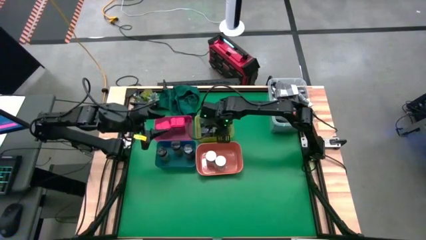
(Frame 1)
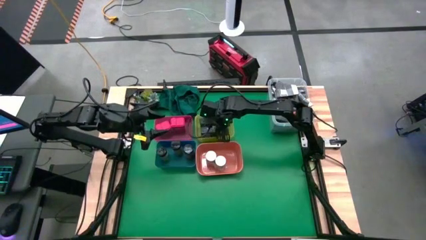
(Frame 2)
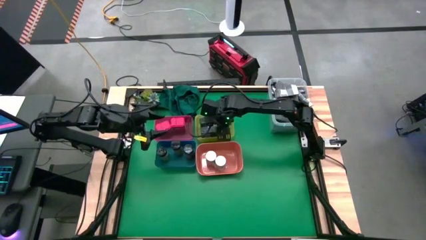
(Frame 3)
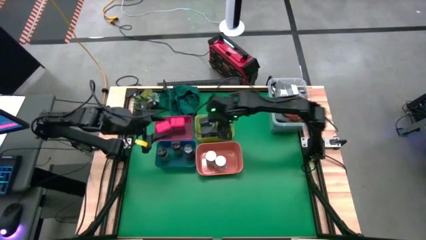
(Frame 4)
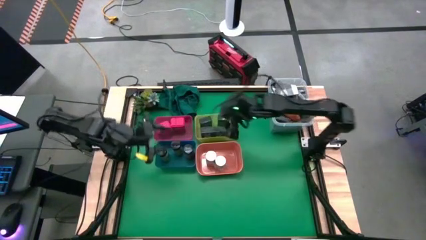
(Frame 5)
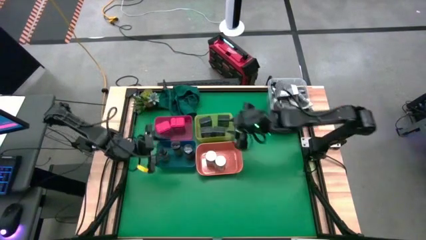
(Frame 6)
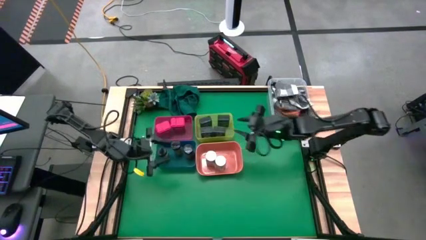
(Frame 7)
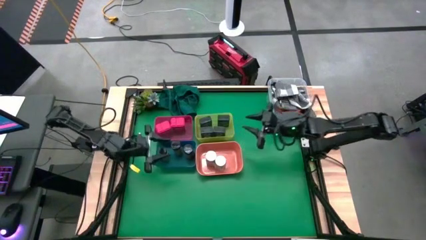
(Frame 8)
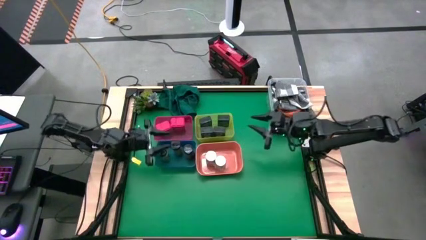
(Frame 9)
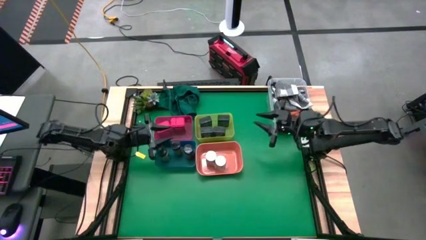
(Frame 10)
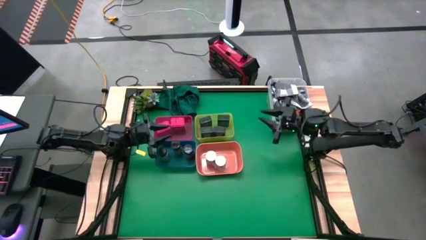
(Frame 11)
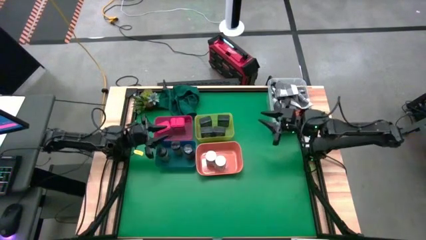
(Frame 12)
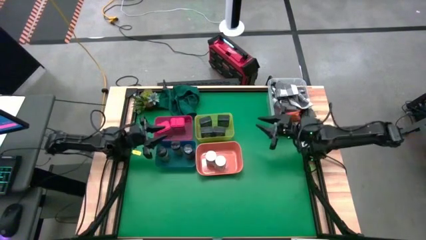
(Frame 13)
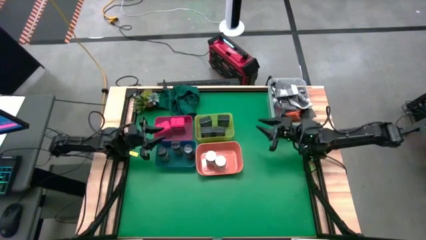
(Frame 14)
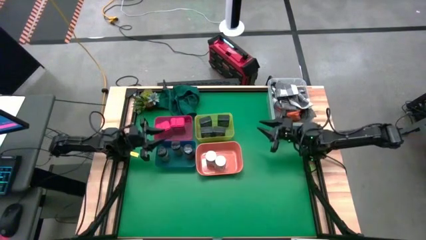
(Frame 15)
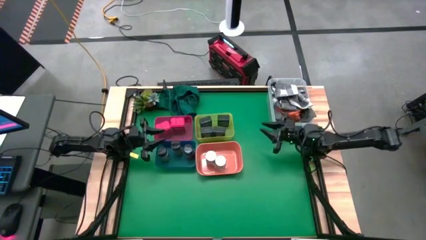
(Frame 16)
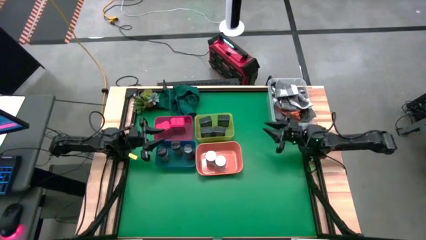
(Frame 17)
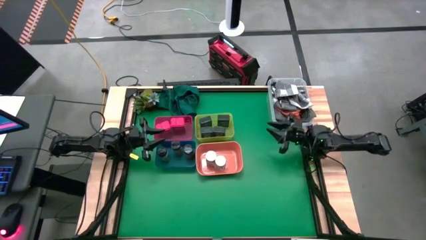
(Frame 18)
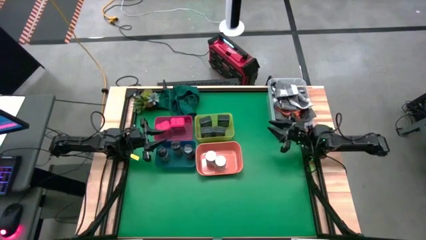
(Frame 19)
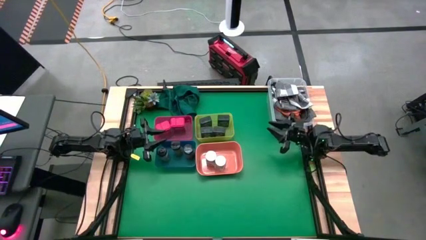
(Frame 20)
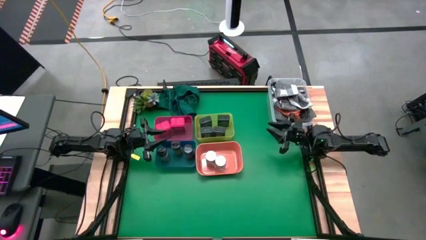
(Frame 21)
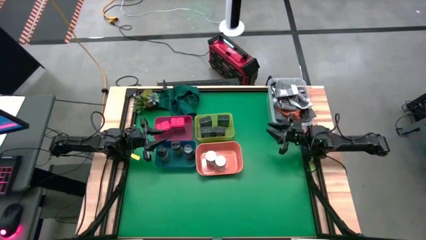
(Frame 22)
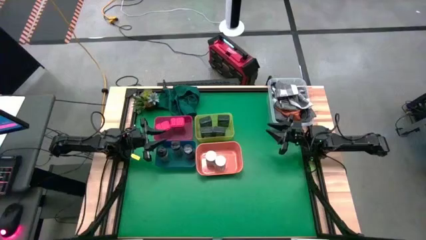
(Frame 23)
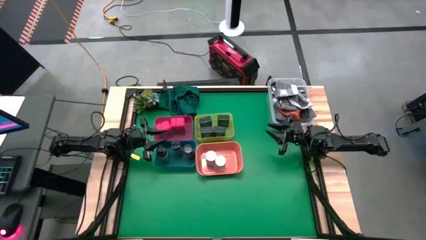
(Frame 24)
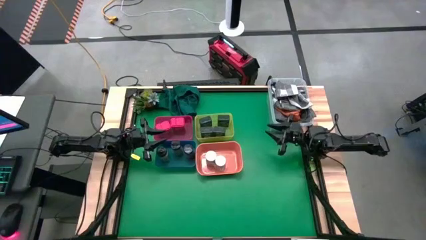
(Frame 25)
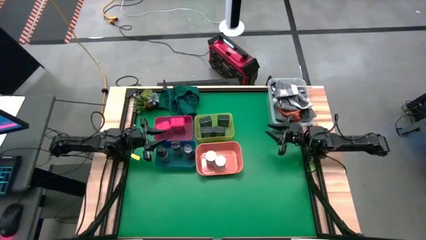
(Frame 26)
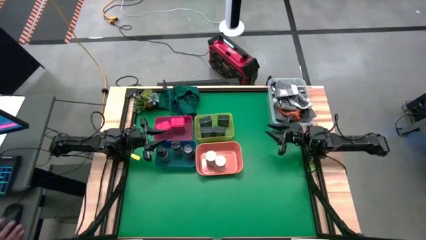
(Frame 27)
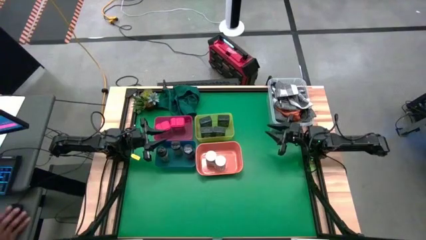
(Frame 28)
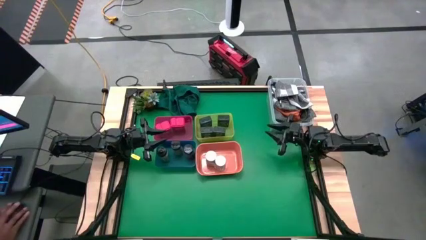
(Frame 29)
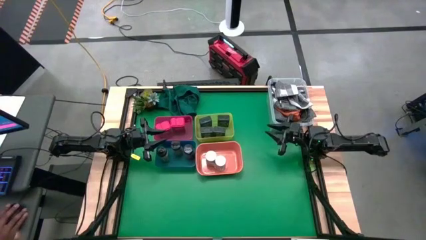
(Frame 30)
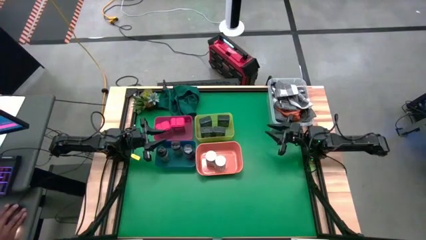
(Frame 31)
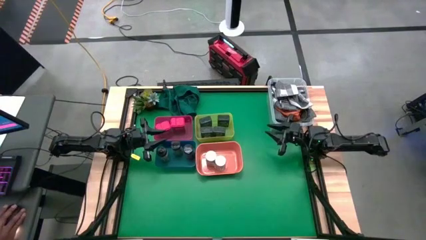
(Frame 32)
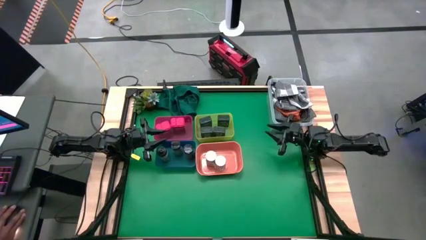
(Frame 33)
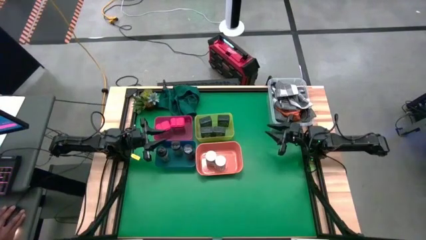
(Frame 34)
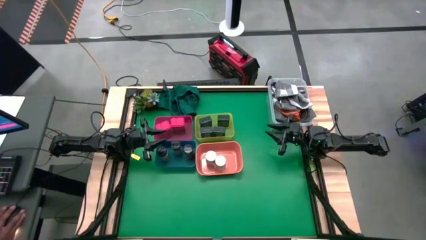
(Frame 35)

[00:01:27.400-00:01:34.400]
Task: Sort spices by type
Return to Home Position

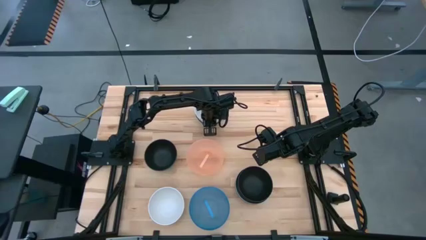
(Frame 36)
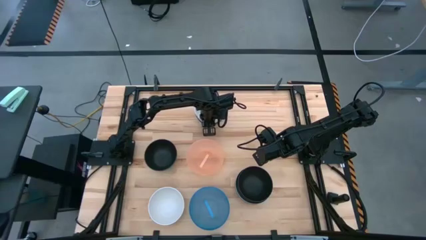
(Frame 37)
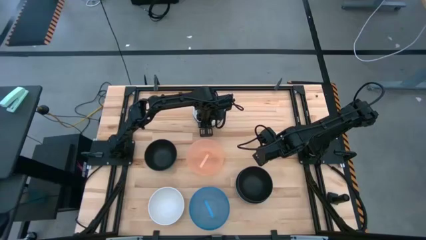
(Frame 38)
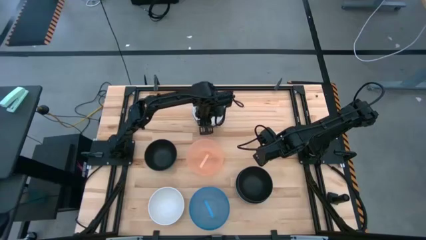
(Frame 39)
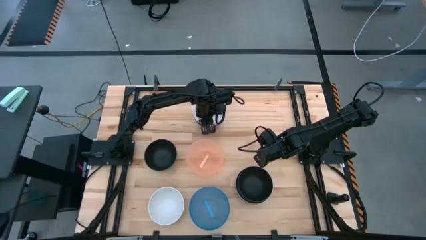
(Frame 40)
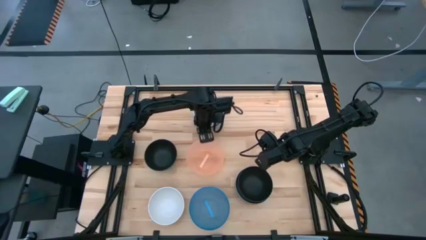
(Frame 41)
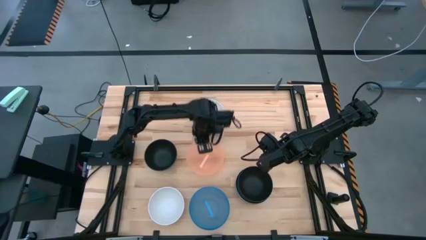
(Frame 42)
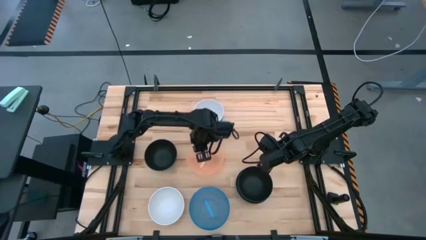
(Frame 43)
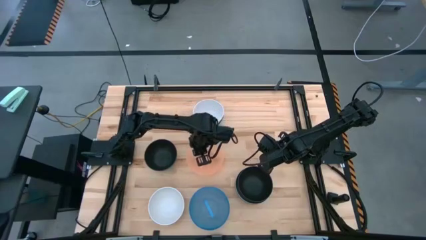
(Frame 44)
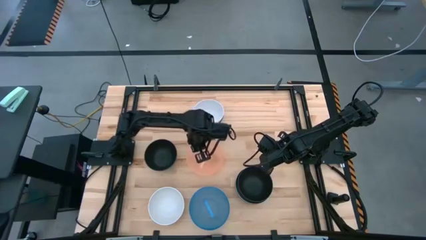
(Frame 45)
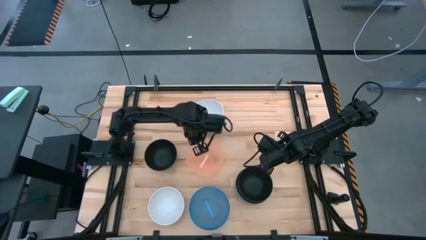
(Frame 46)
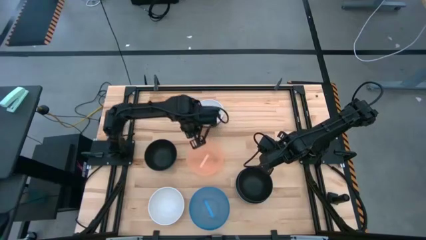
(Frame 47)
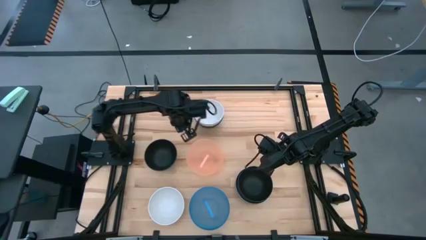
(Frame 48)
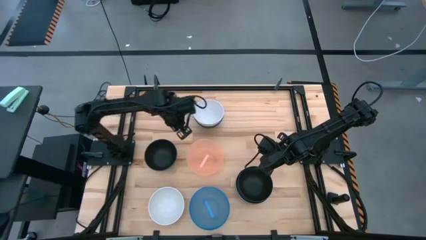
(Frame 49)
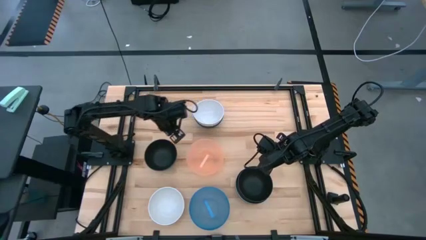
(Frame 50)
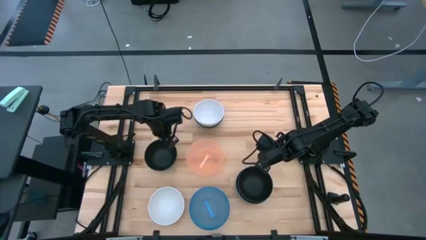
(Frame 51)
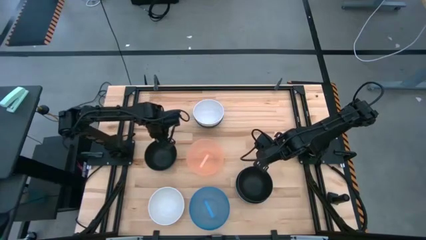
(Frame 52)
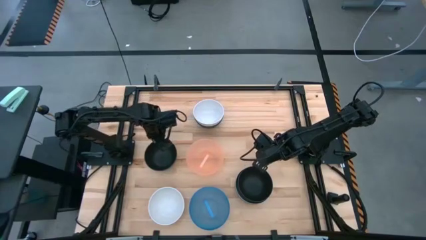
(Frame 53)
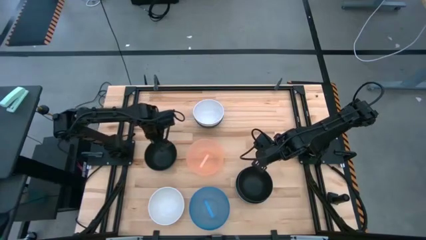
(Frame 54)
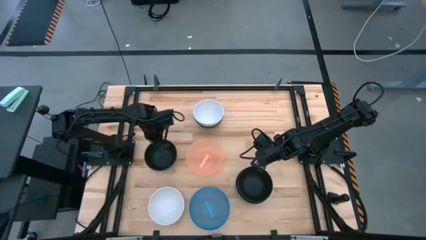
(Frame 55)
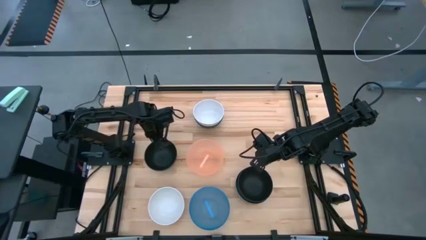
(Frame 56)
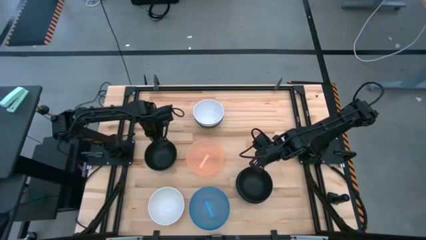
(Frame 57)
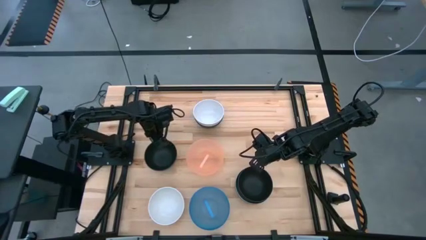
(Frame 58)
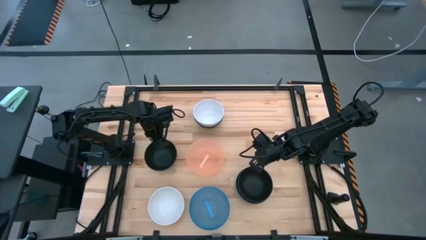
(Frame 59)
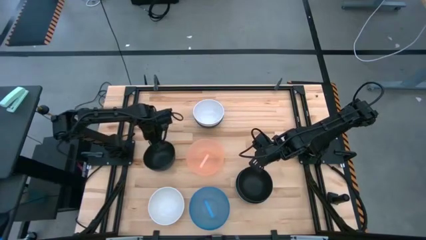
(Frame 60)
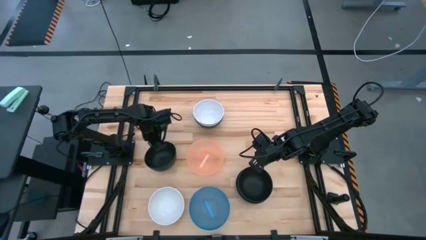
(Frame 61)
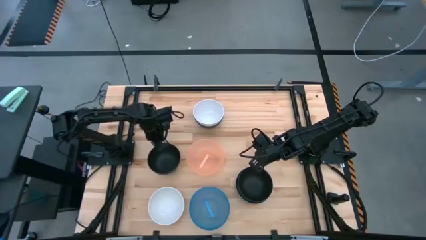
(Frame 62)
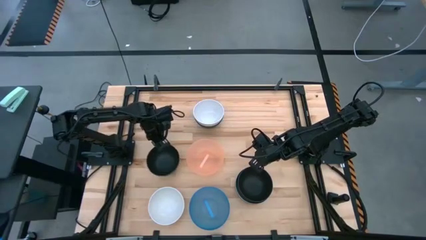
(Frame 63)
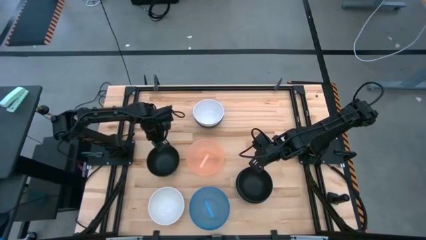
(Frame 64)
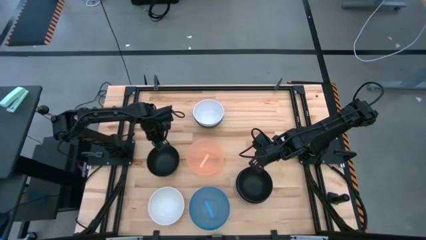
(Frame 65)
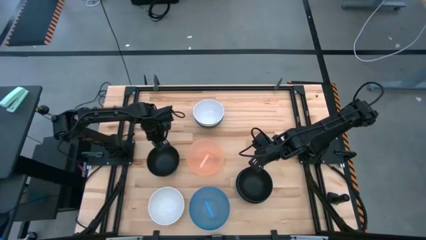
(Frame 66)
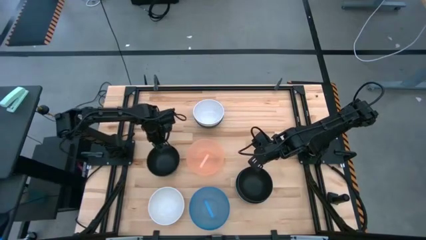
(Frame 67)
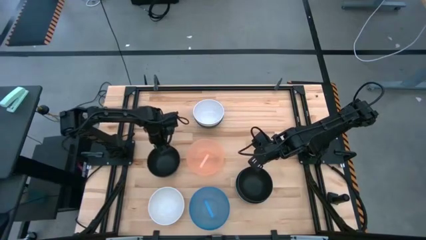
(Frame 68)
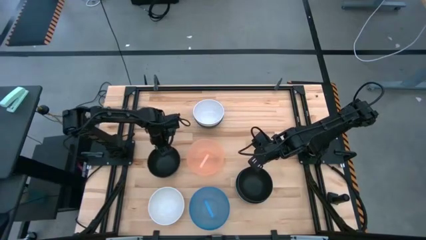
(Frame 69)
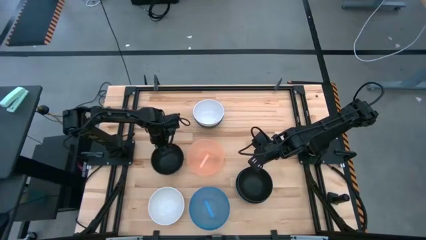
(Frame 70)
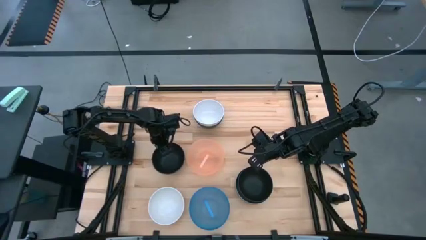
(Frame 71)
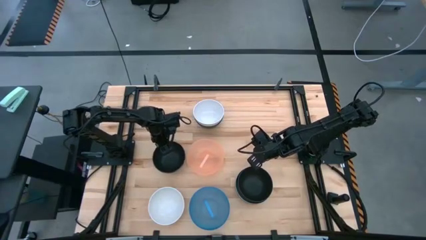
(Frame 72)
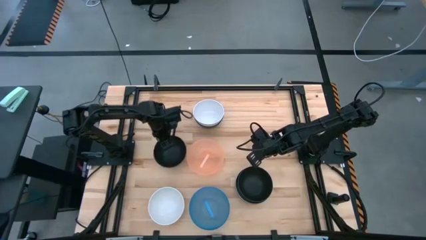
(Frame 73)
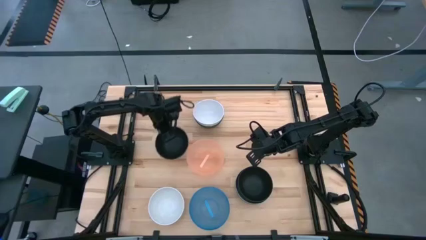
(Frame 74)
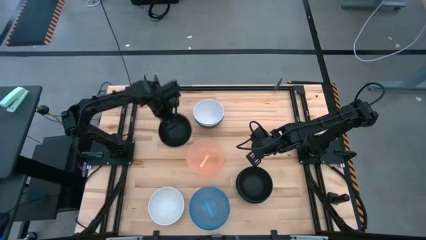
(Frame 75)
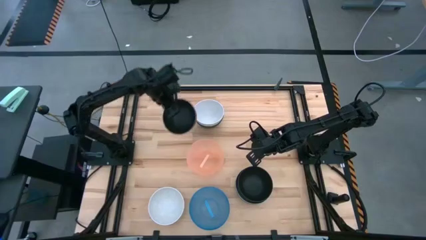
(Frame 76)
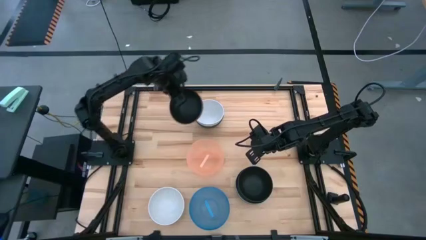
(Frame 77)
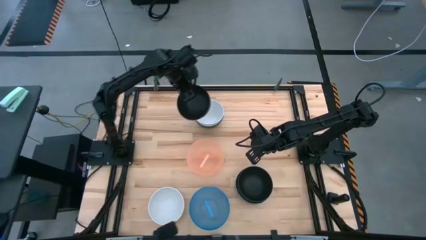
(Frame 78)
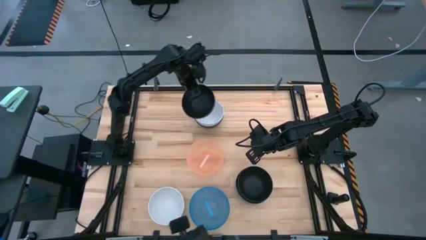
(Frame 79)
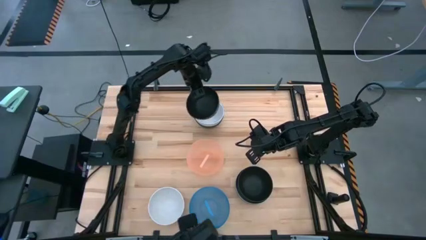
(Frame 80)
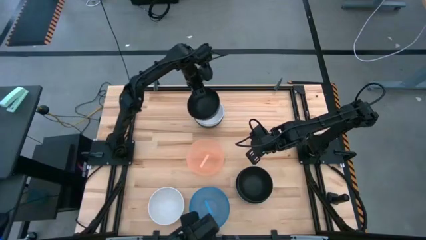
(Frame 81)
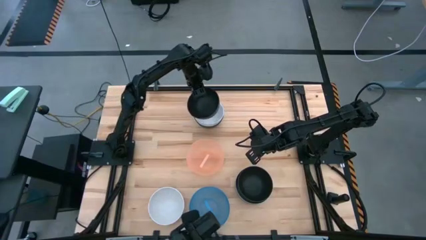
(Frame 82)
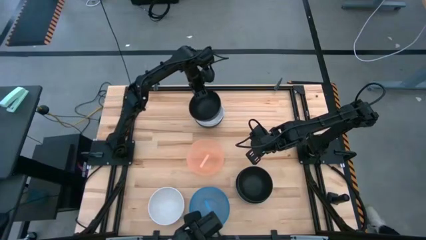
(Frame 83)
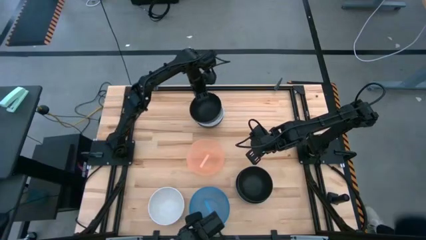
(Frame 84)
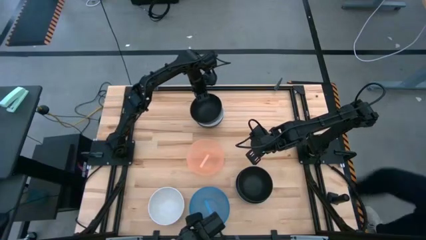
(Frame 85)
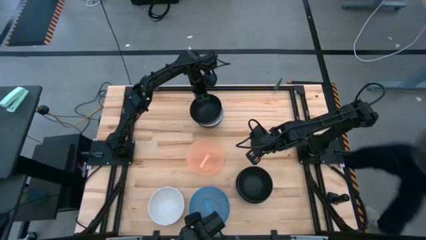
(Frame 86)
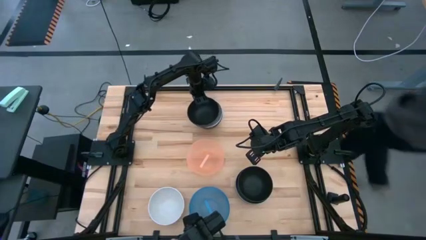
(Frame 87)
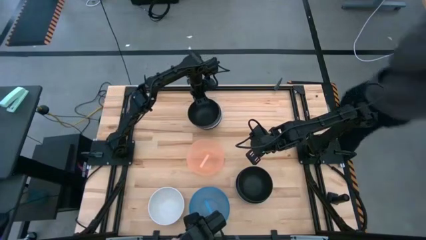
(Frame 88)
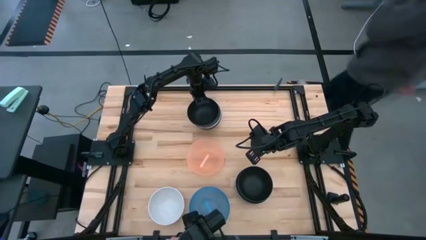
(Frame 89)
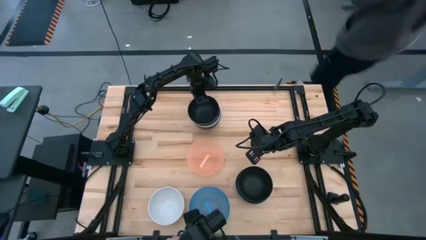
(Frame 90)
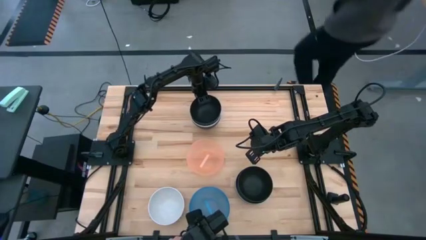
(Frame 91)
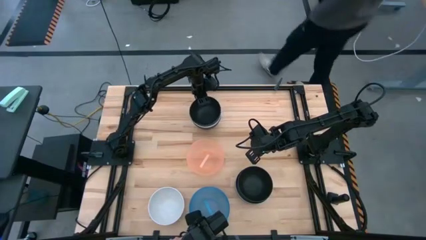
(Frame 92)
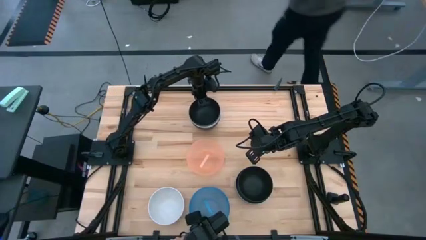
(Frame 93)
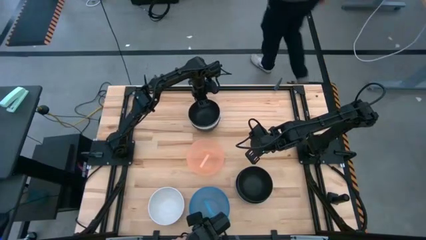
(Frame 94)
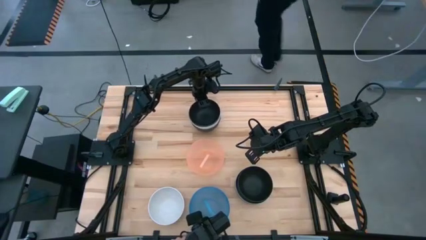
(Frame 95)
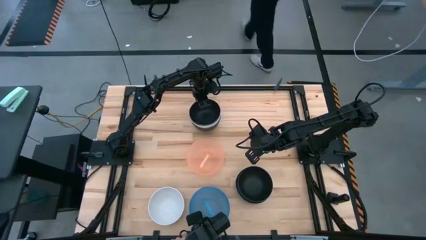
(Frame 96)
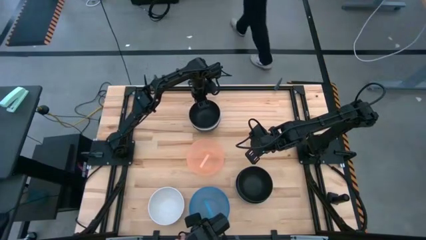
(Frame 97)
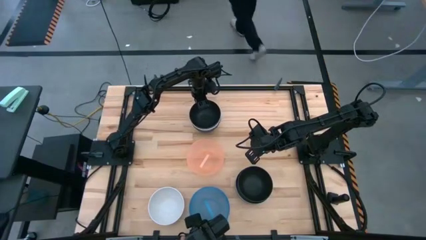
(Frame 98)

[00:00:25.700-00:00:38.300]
Task: Nest bowls inside each other
Stack the black bowl on top of the top stacked bowls
